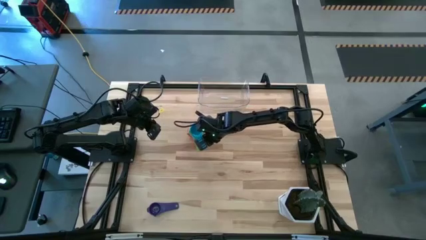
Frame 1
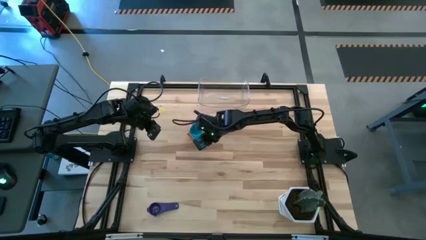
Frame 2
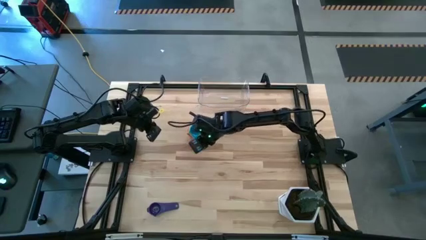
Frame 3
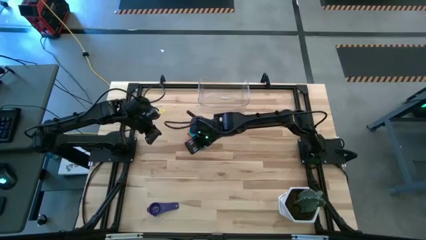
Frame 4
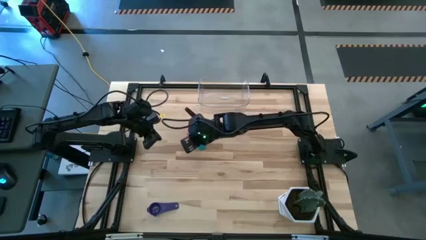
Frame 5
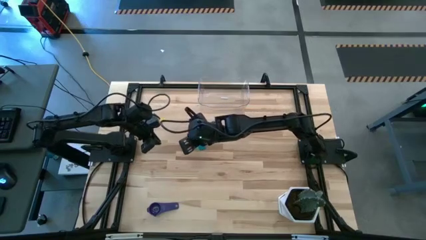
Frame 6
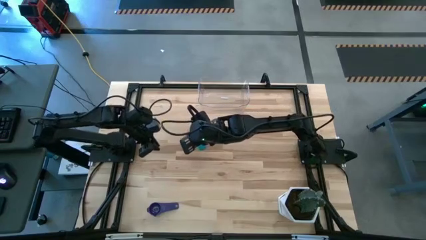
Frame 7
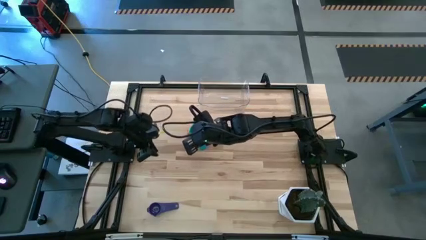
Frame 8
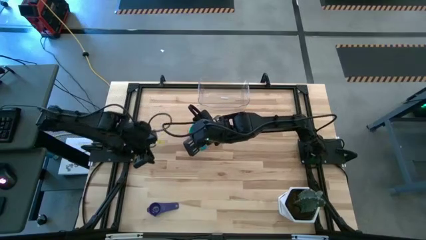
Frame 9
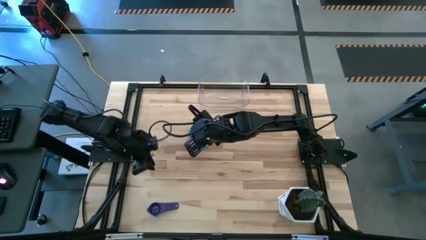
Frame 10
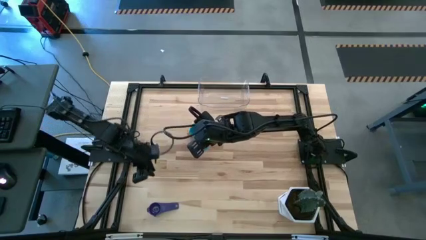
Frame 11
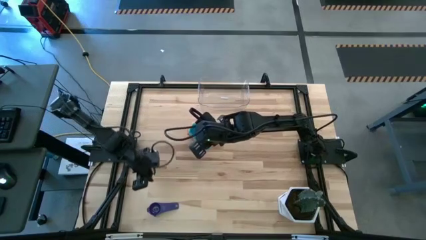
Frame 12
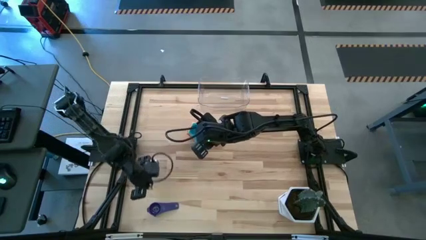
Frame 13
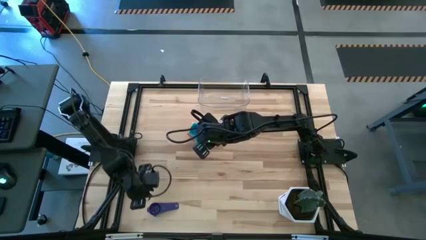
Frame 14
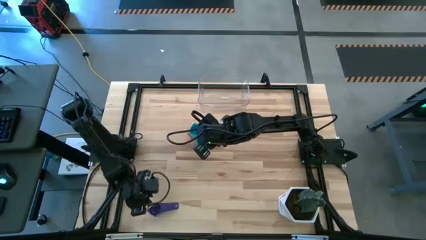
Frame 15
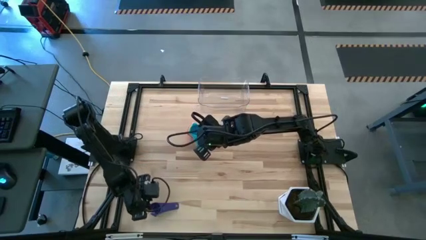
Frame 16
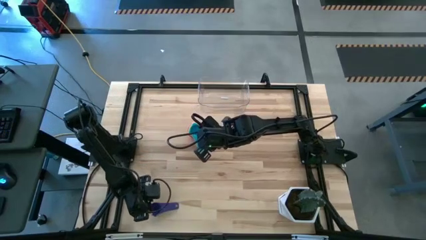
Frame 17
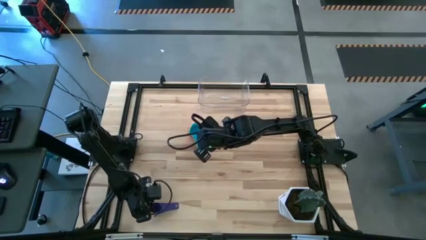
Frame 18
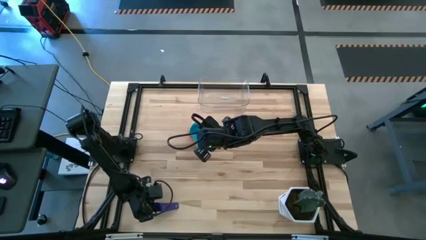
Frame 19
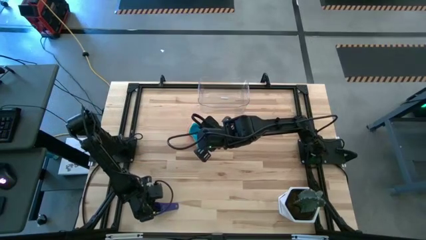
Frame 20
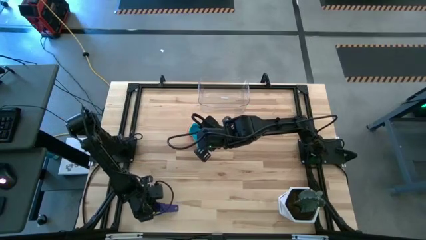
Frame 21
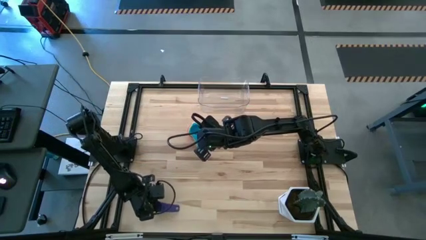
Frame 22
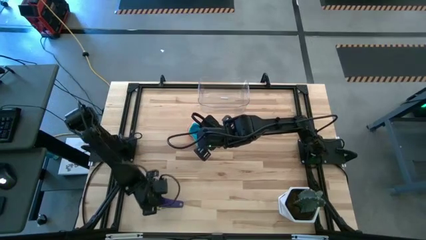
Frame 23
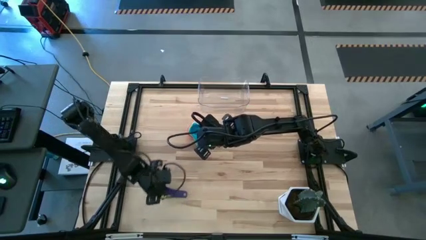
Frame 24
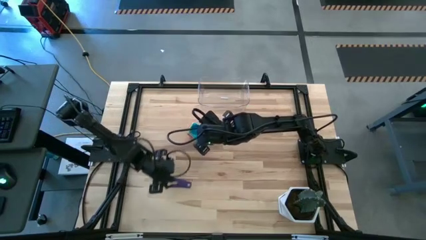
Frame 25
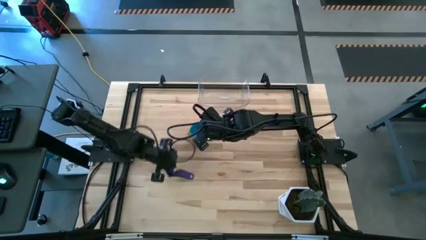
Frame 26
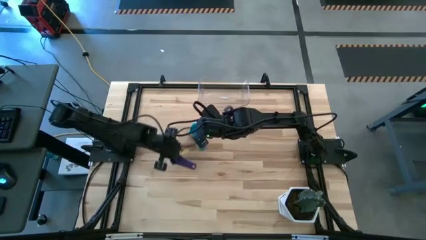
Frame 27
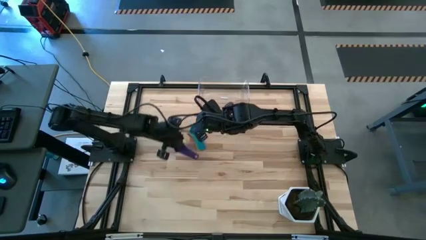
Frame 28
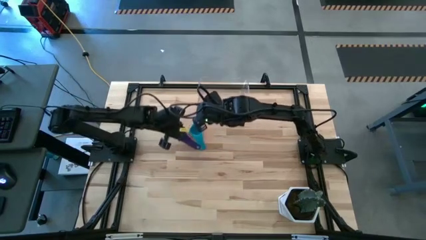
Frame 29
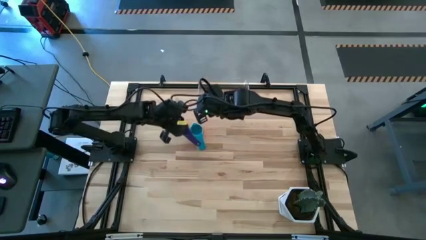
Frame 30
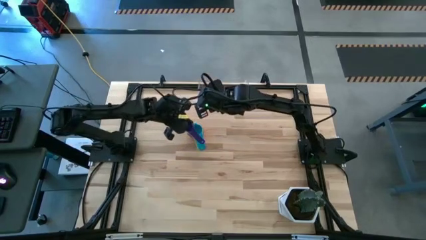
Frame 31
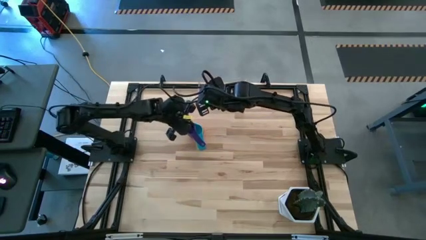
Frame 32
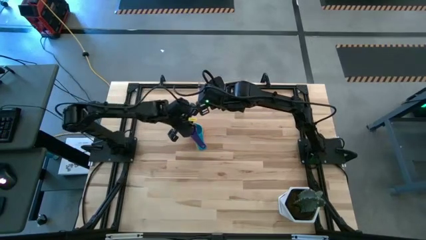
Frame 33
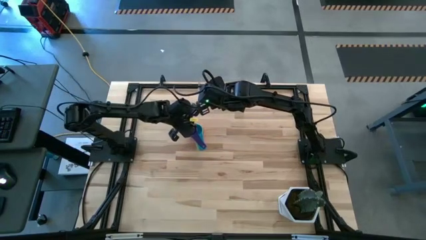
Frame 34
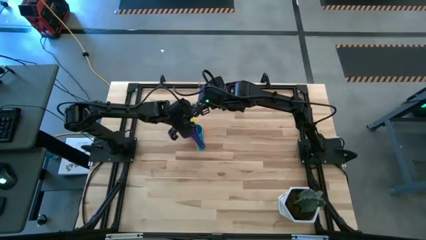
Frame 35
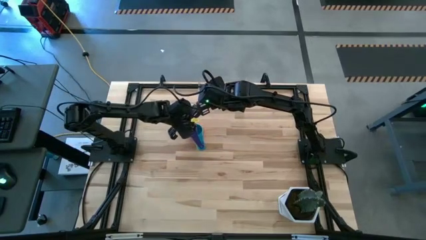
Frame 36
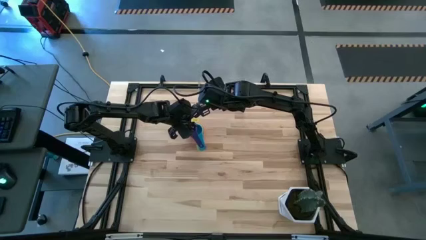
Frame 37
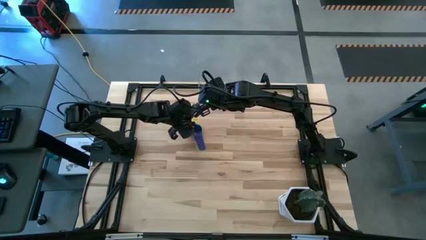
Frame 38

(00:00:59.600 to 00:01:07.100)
Task: Nest measuring cups in basket
Stack the violet measuring cup on top of the light blue measuring cup

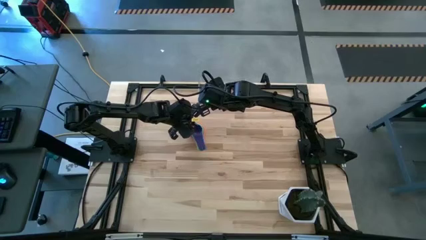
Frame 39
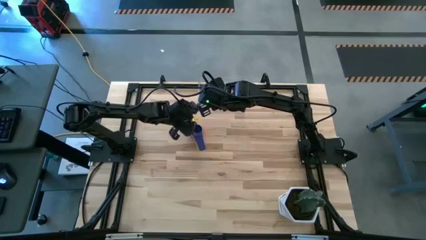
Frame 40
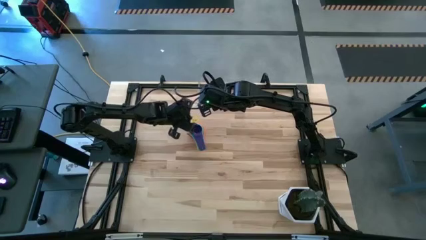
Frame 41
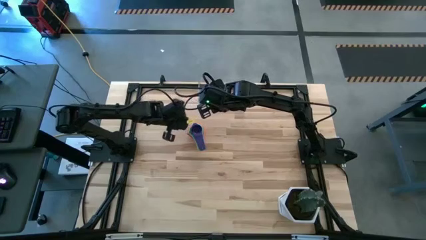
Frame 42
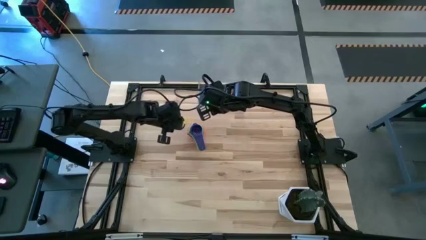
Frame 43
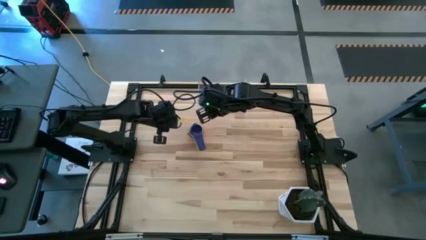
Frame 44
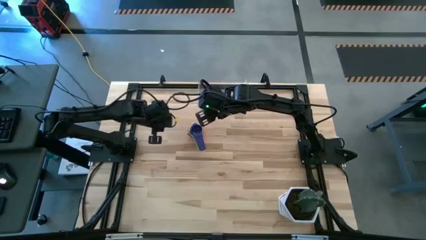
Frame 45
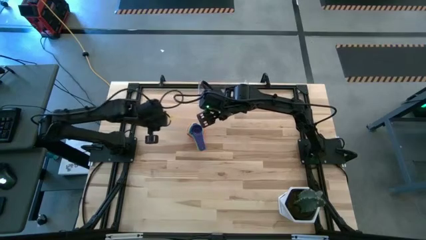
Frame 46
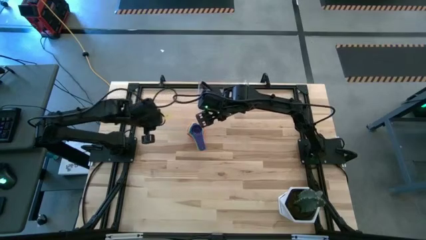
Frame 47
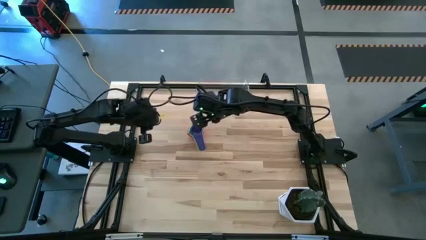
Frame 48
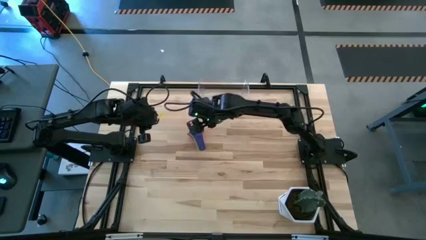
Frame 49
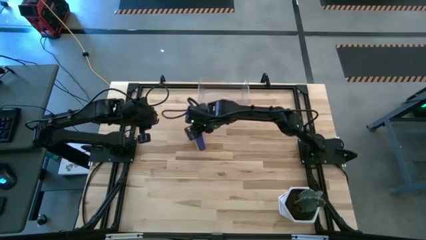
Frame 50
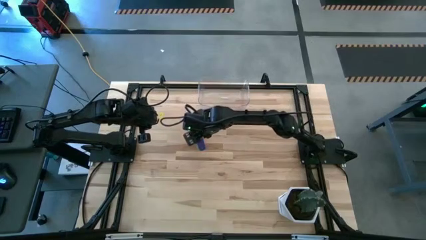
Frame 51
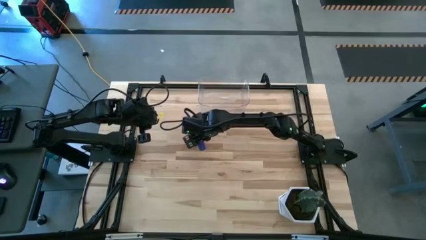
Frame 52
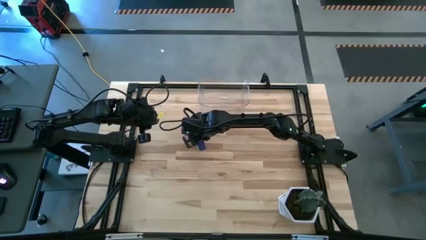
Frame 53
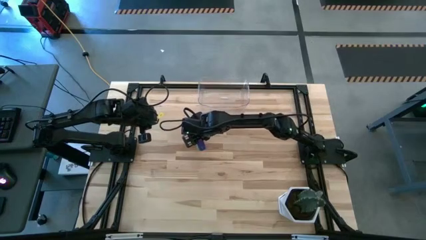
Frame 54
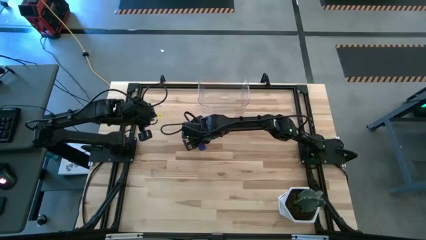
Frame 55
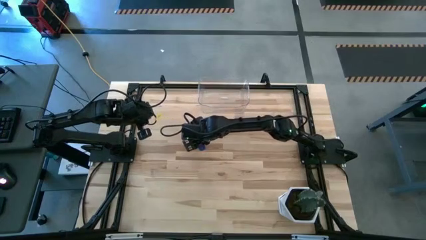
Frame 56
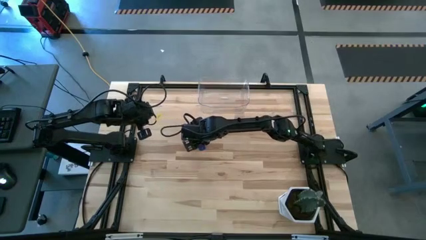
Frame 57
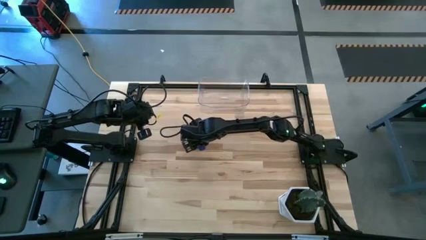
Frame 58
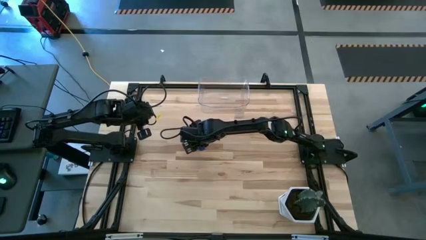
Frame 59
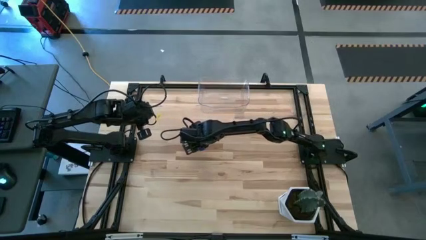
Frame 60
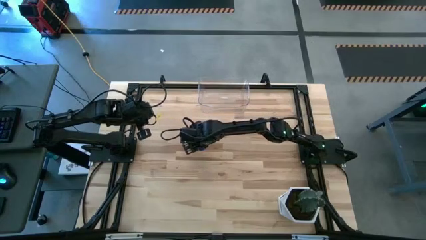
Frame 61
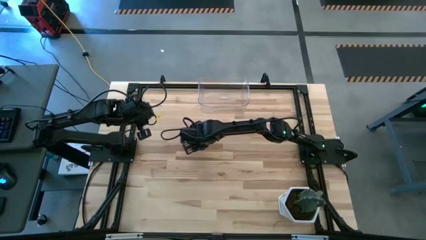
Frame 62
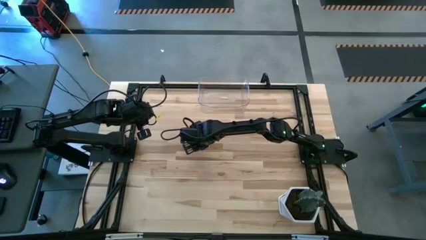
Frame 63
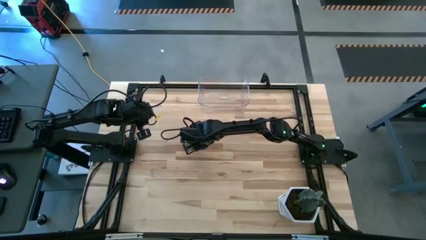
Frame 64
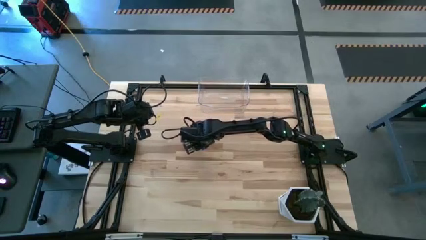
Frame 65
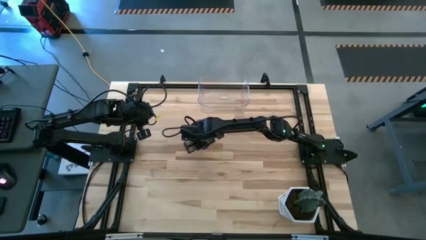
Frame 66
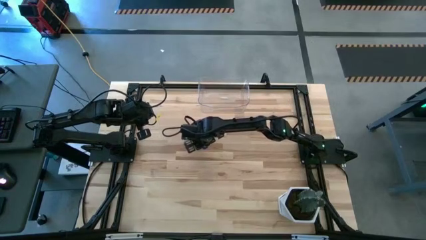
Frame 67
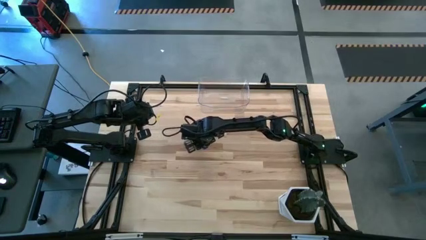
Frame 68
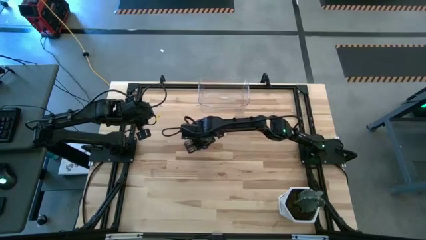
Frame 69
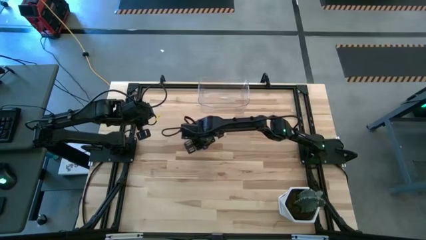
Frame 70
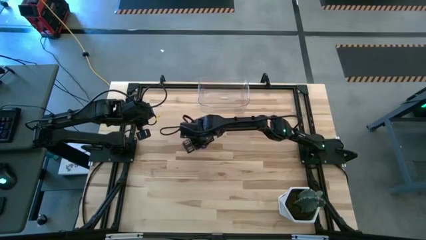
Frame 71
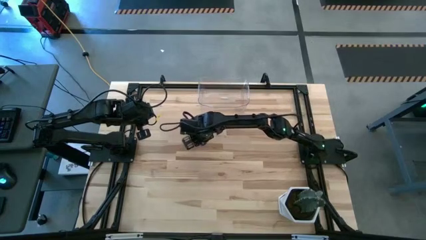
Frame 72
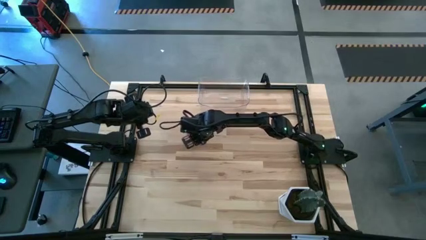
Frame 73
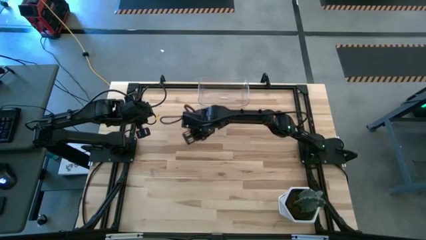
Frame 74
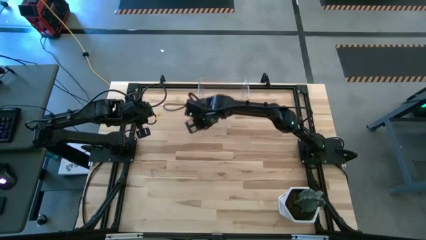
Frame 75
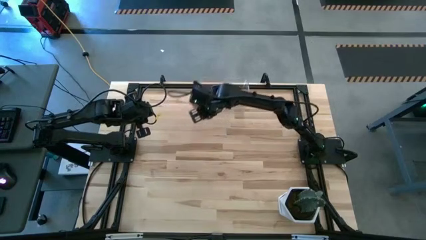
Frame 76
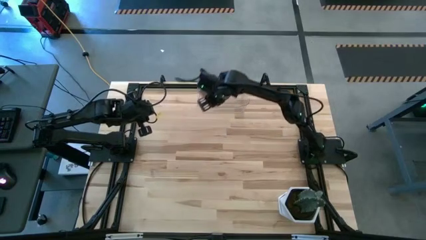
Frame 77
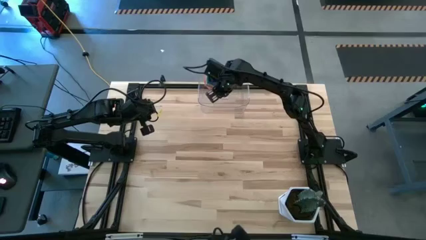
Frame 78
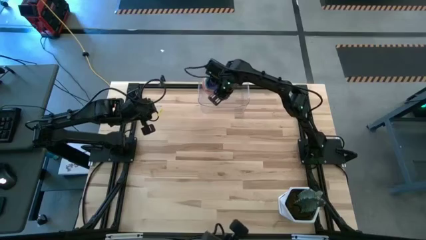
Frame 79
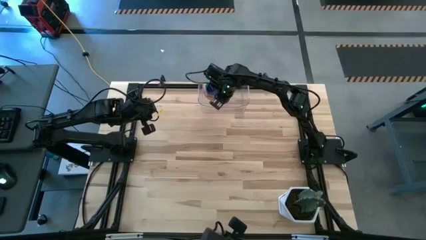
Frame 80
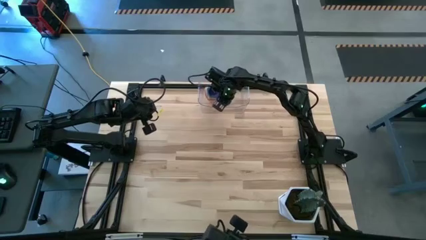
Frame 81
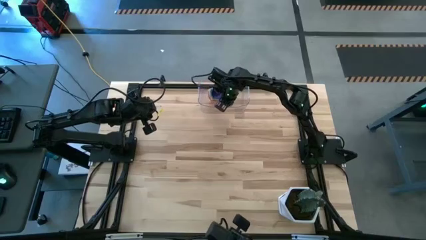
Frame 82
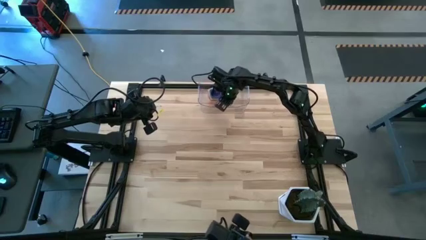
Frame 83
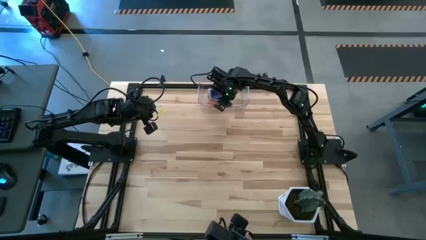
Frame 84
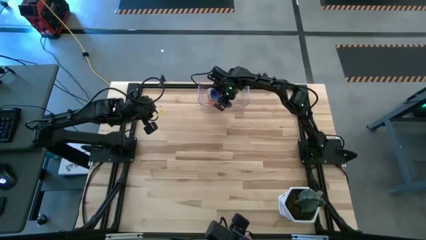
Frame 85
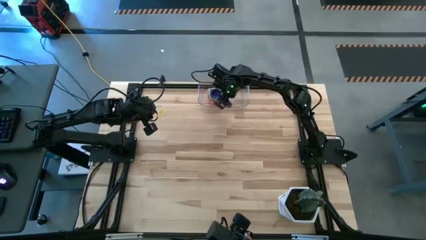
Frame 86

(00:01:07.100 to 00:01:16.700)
Put the nested measuring cups into the transparent bin

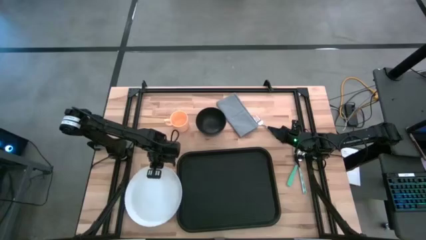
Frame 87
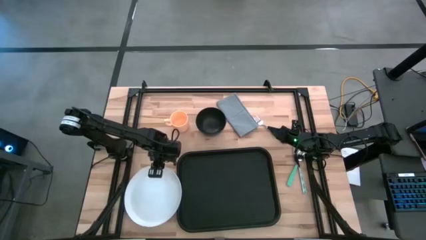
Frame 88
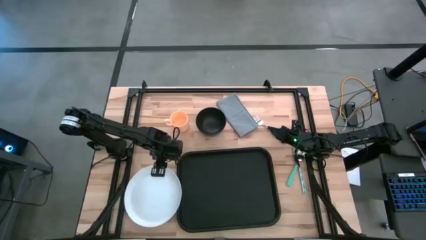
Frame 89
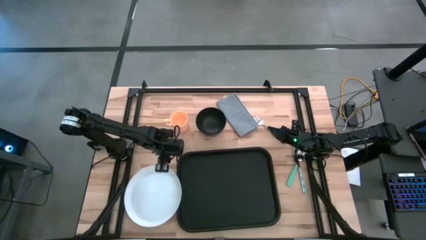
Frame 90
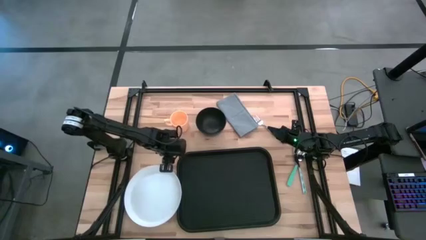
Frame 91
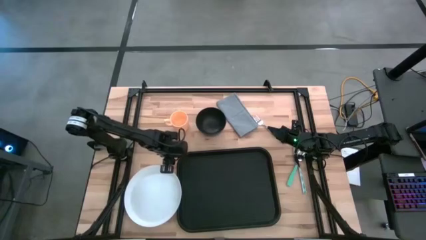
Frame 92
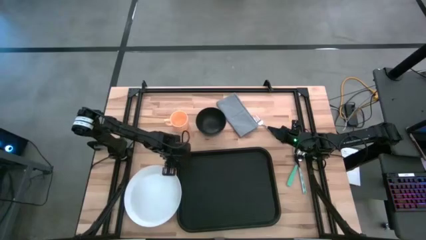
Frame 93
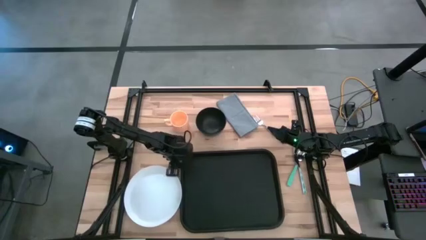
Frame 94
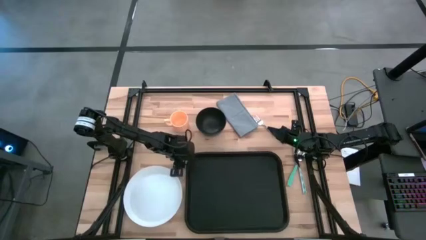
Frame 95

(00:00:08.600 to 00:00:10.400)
Task: Set up tray
Adjust the black tray
